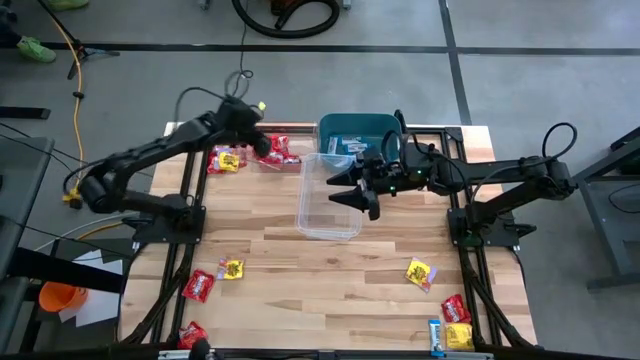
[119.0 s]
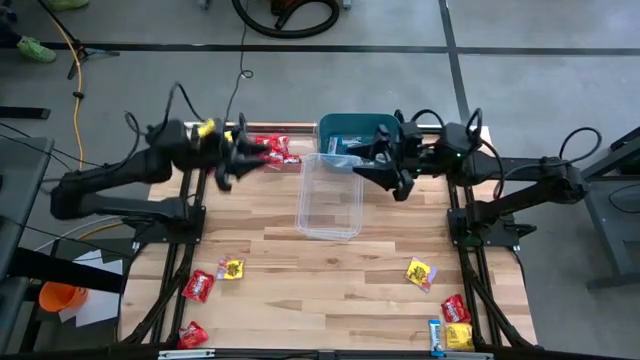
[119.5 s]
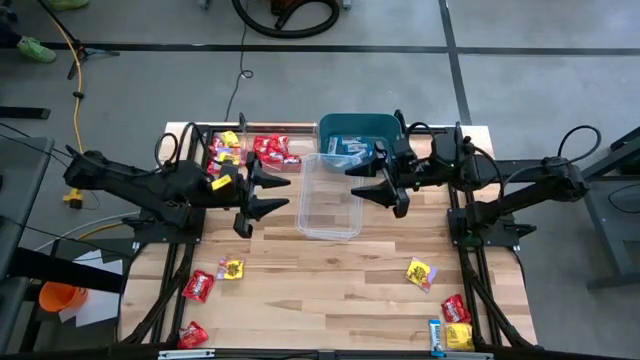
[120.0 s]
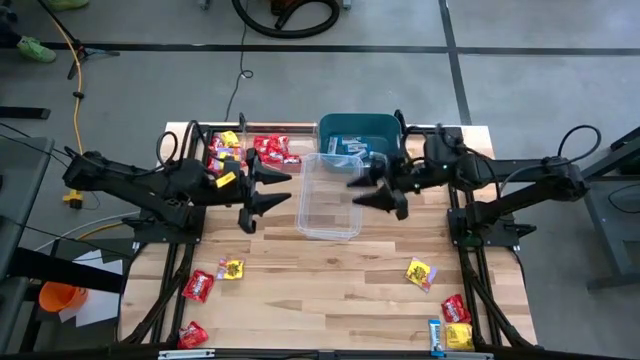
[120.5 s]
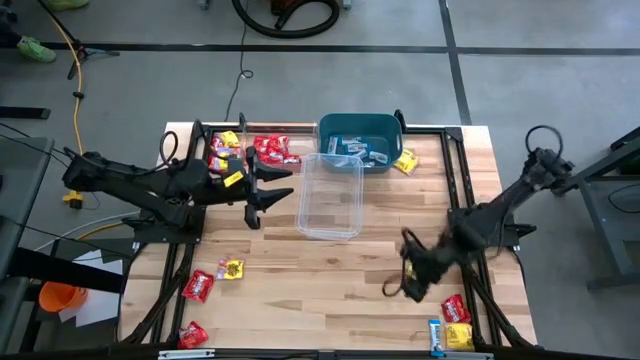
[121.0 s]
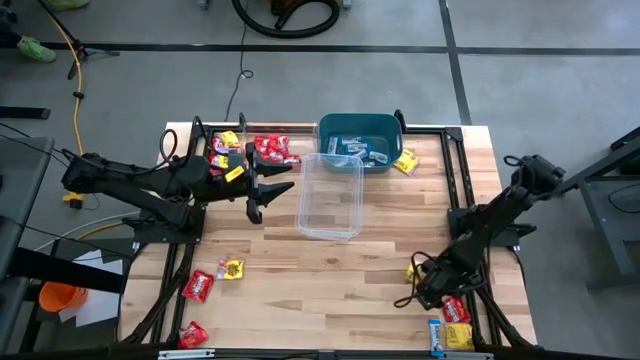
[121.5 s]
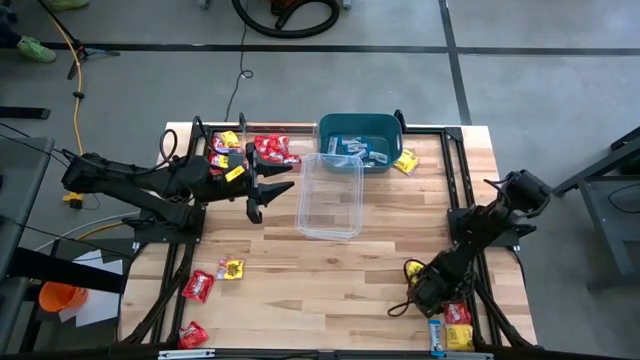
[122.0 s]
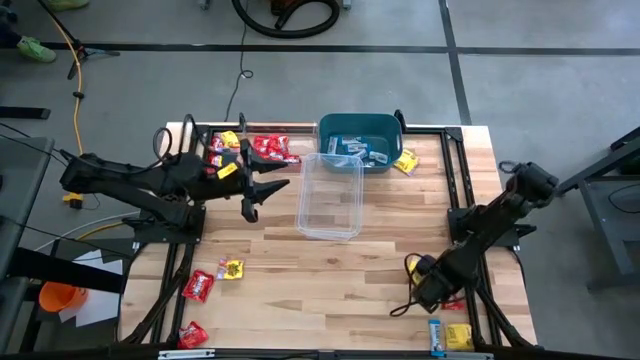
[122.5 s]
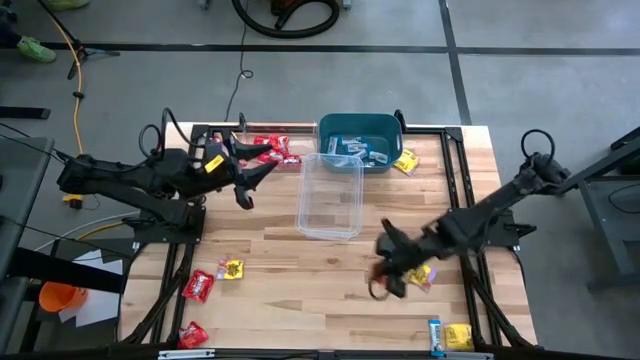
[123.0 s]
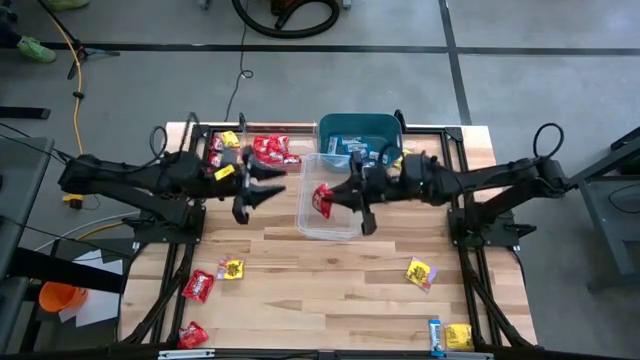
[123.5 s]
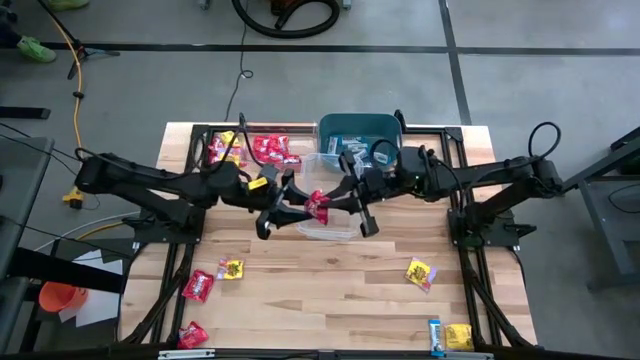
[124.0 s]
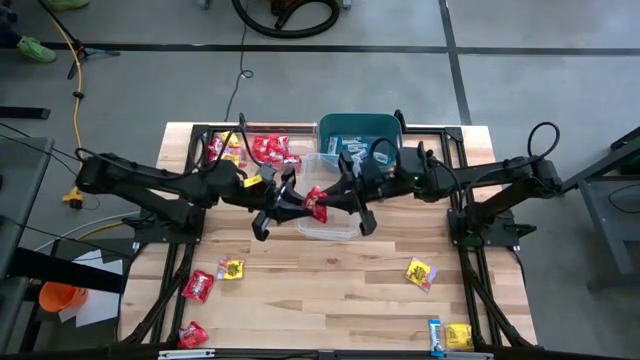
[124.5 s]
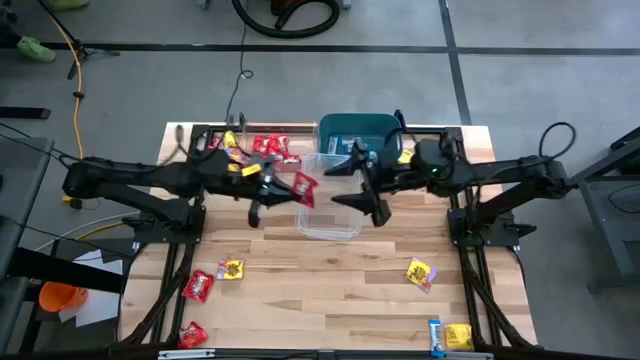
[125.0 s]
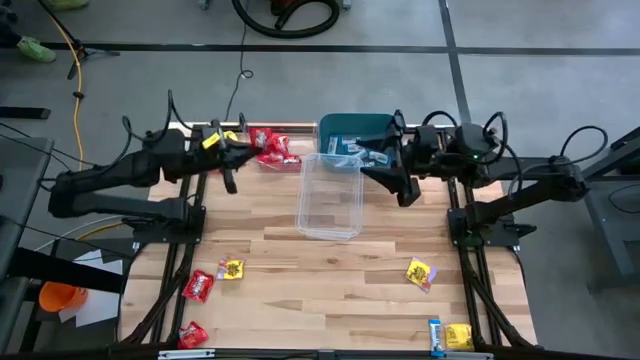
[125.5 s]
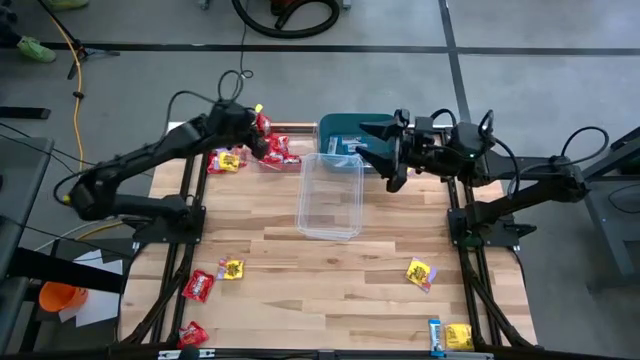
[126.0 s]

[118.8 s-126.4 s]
Task: Sort candy
Put the red candy into the transparent bin

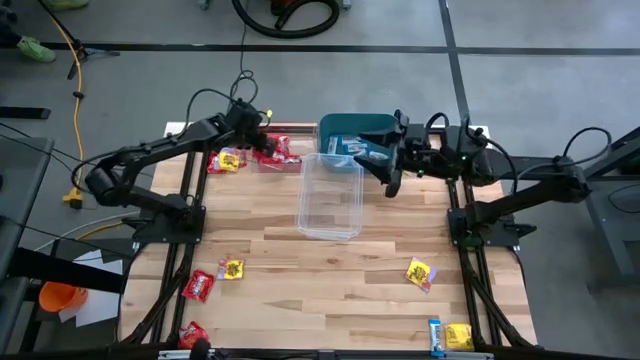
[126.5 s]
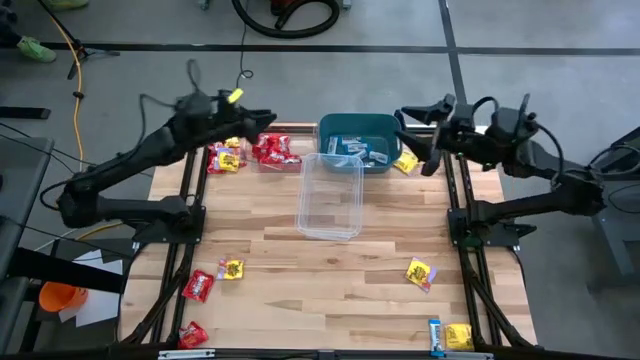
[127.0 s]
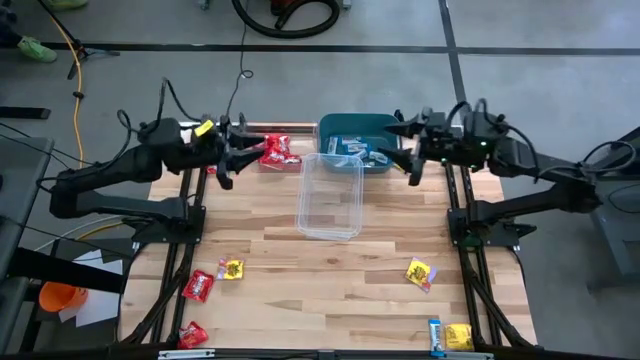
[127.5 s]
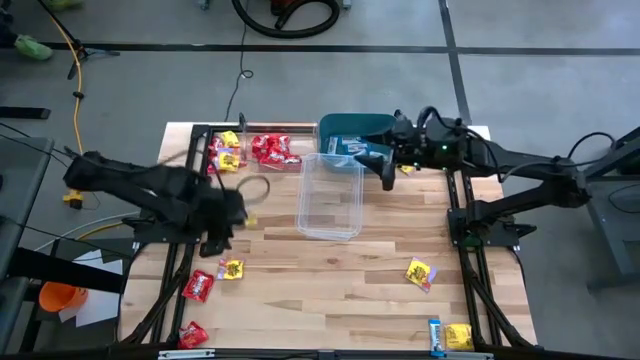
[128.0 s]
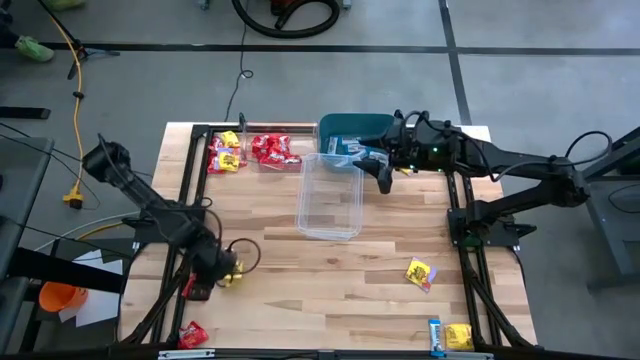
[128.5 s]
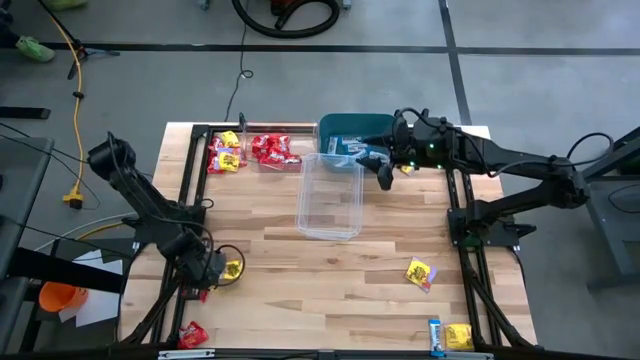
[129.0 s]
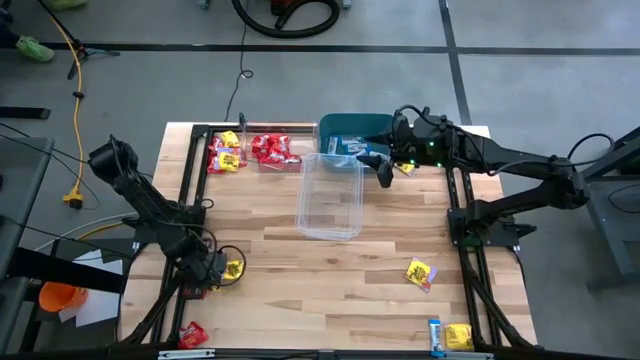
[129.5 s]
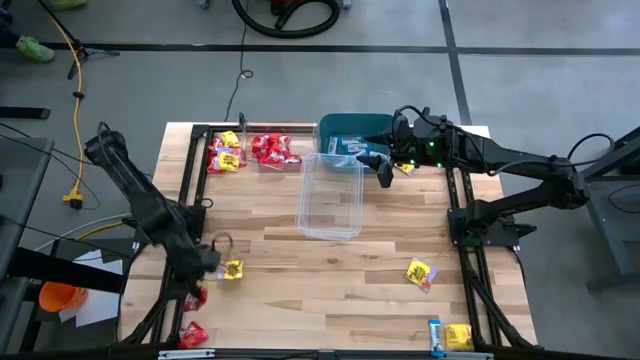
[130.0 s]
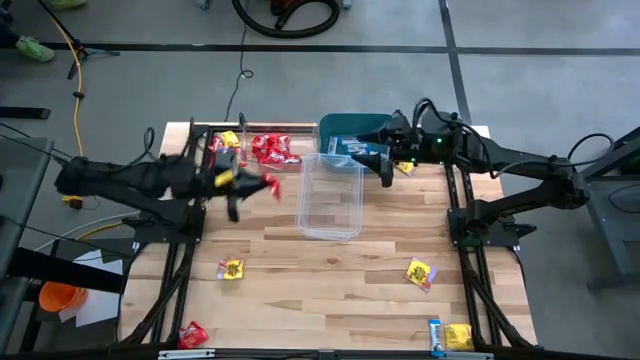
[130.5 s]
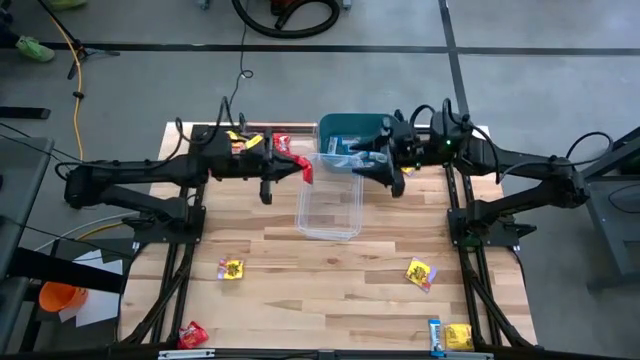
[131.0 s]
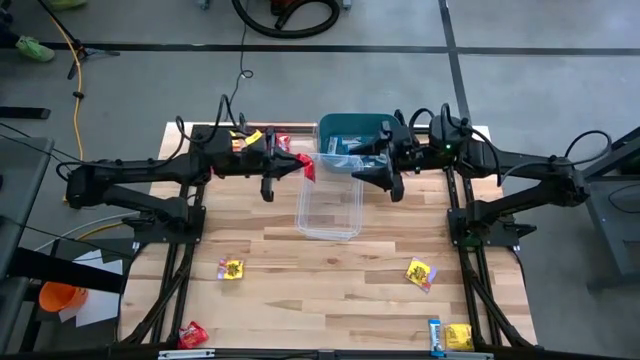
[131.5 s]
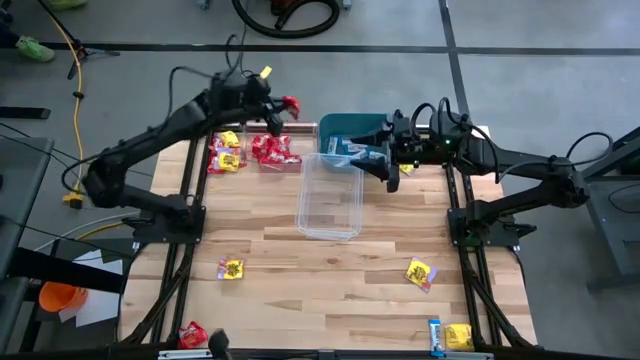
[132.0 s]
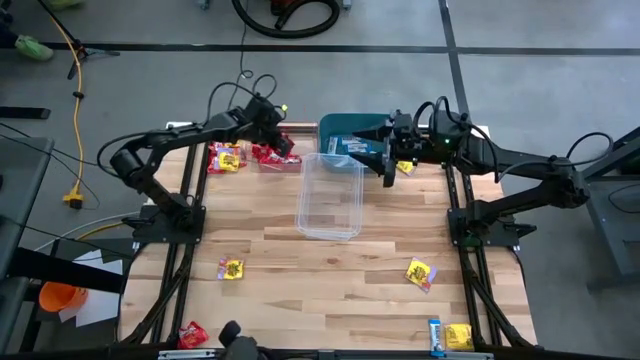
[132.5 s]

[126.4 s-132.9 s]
Put the red candy into the transparent bin

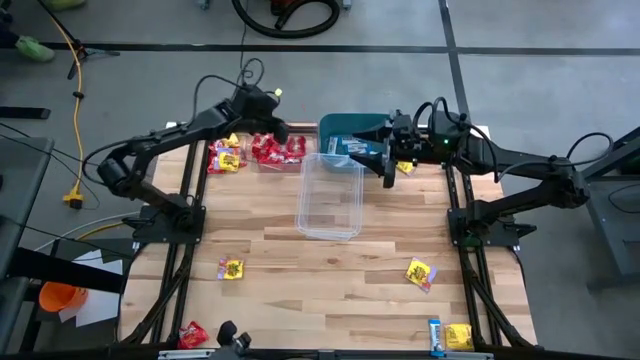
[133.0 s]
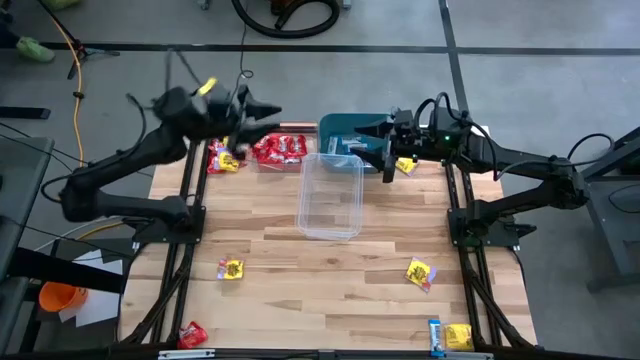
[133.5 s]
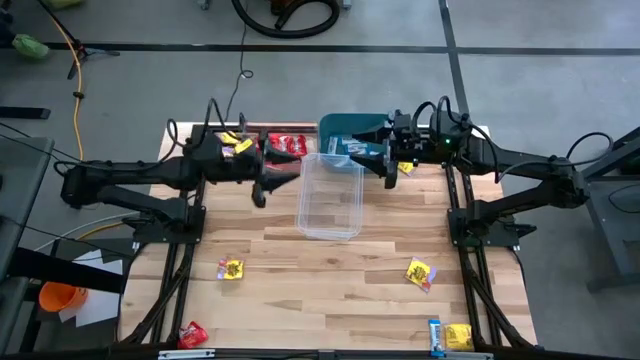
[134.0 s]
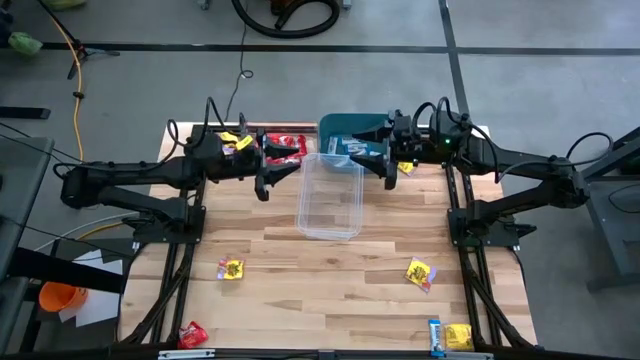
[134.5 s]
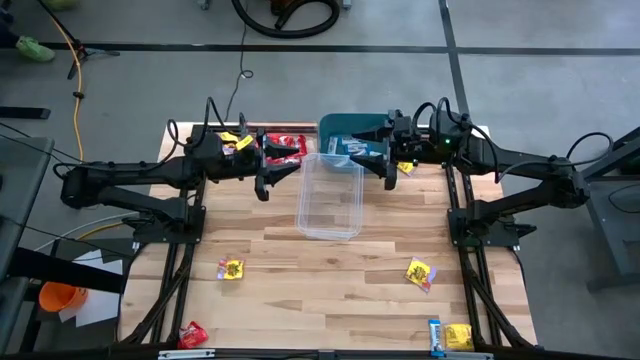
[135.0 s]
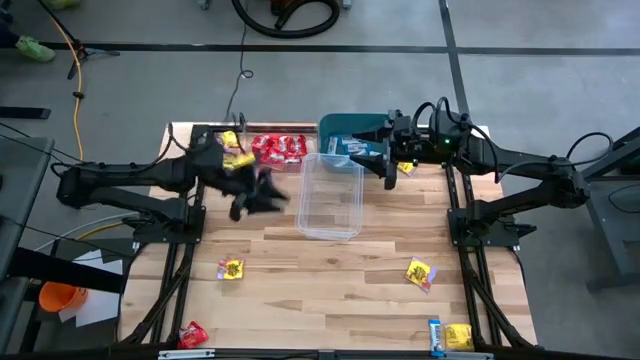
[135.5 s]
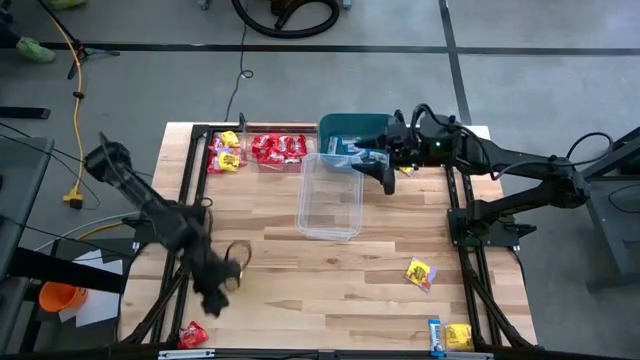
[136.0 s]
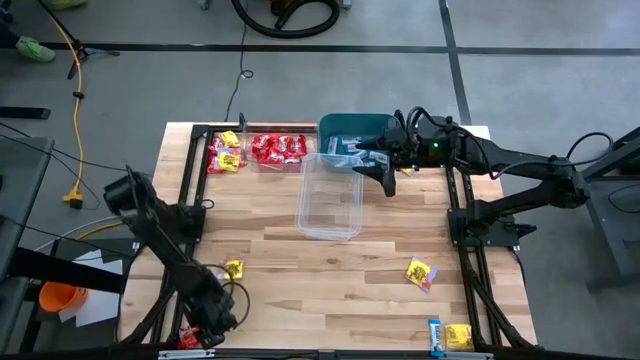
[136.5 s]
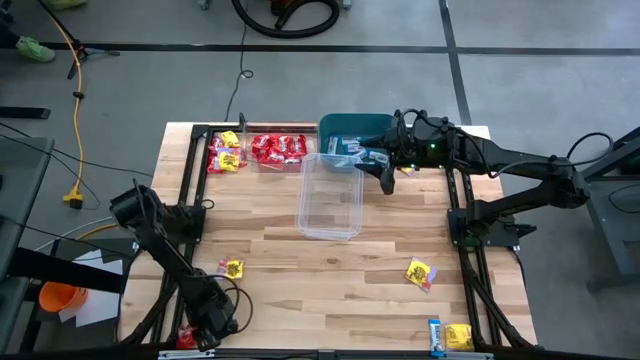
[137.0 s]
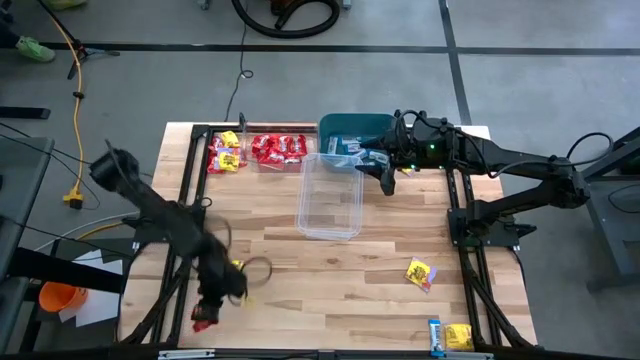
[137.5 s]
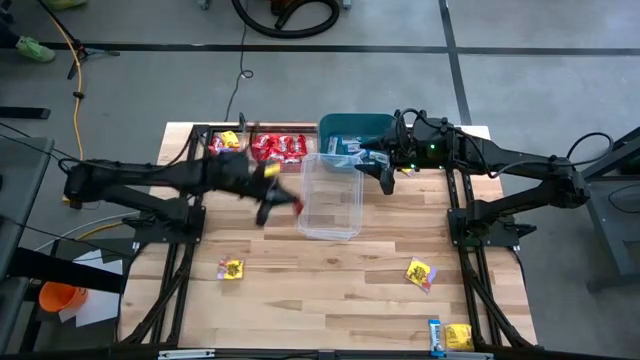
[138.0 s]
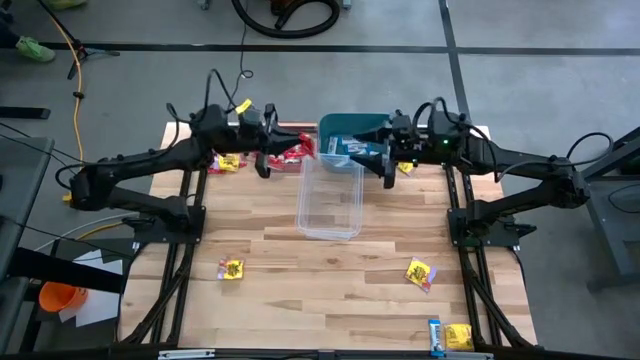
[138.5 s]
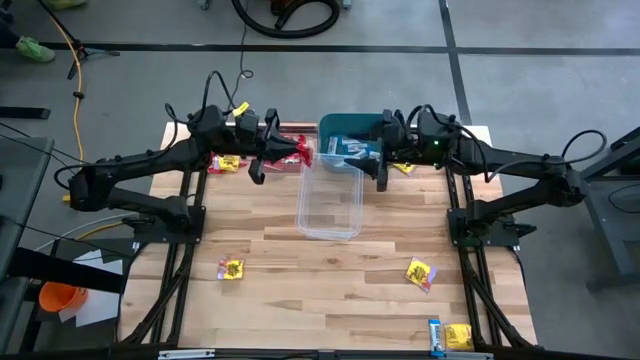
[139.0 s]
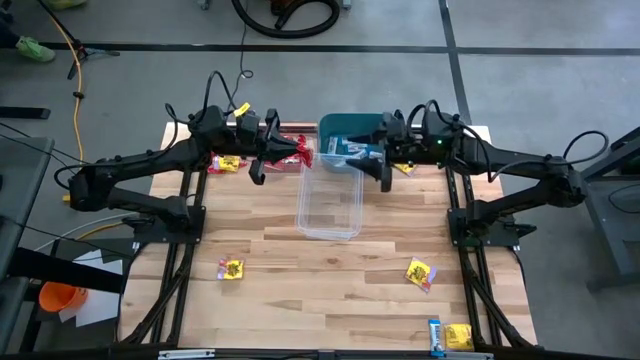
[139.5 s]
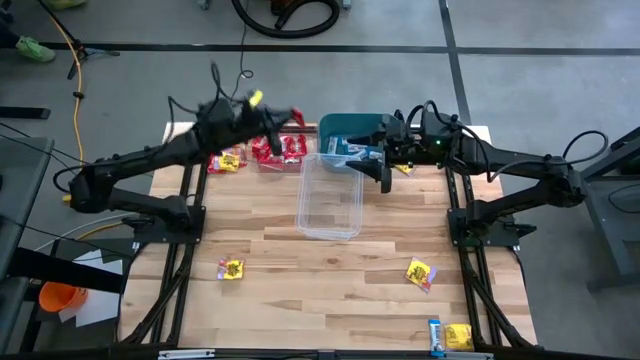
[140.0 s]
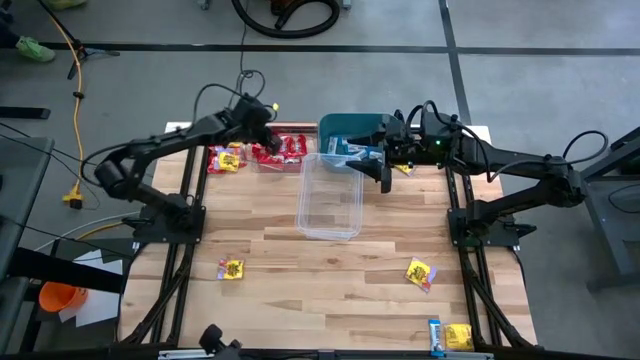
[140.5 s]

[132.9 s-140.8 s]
Put the red candy into the transparent bin
